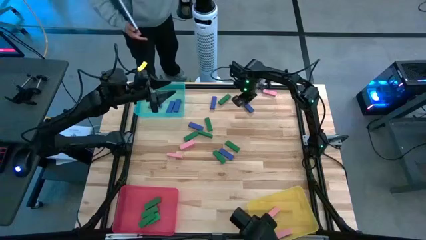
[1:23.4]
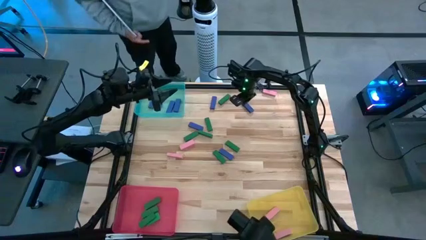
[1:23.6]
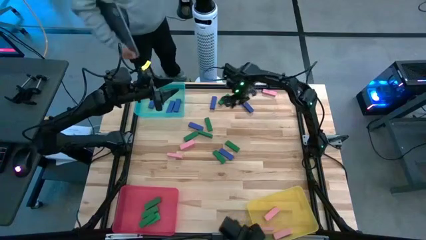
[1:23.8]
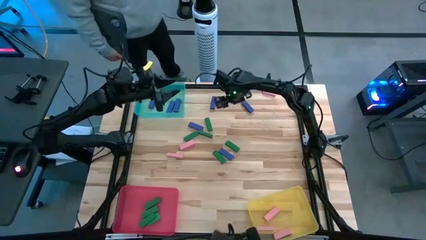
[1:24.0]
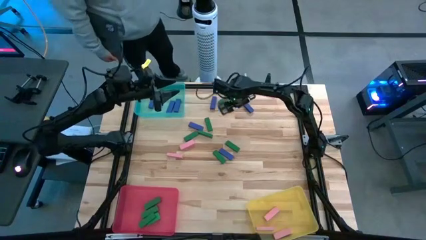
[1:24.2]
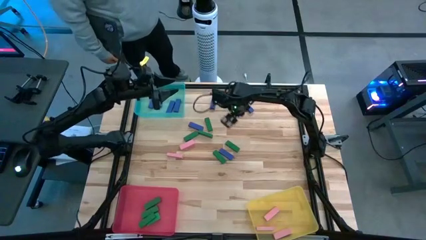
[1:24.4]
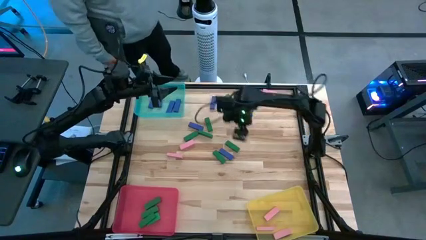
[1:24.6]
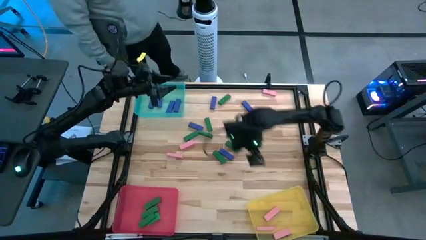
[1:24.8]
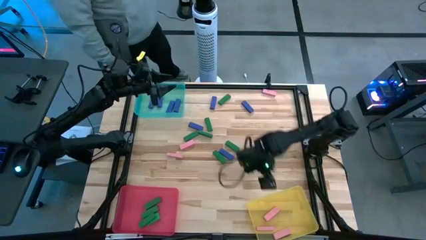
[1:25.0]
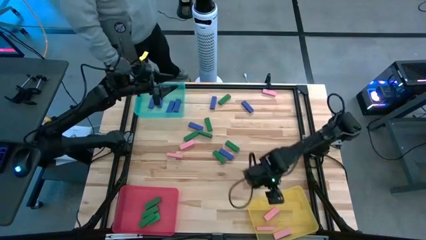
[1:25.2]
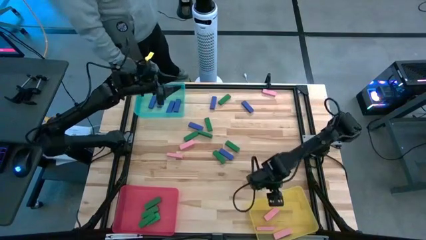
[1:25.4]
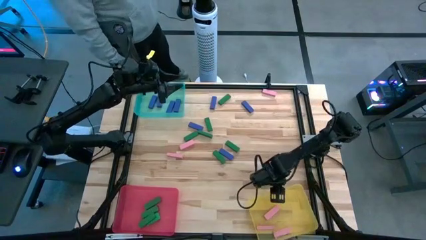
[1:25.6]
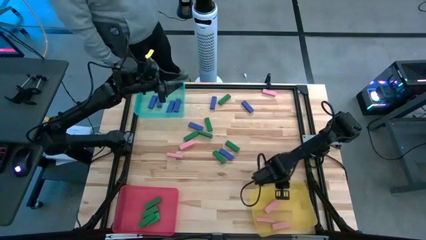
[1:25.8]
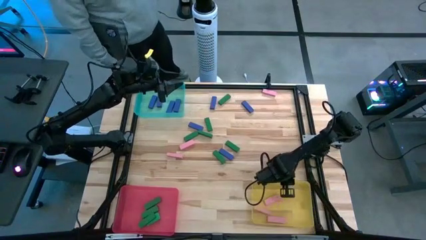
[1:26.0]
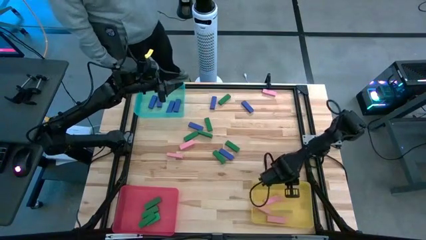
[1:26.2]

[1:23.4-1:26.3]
Task: Sort blocks
Adjust the yellow bin

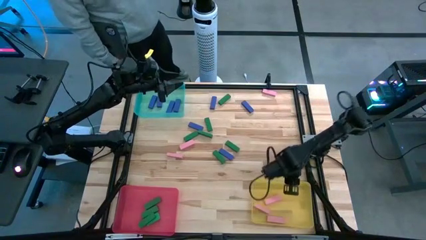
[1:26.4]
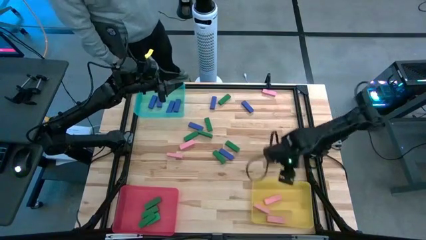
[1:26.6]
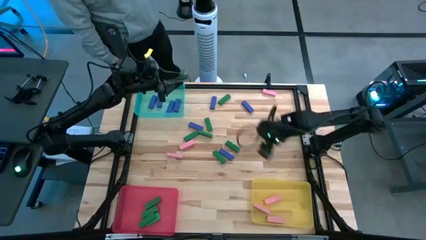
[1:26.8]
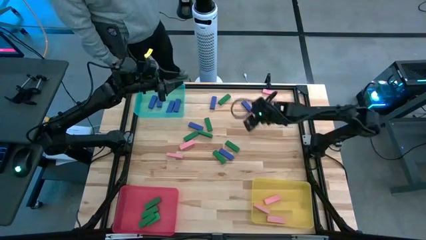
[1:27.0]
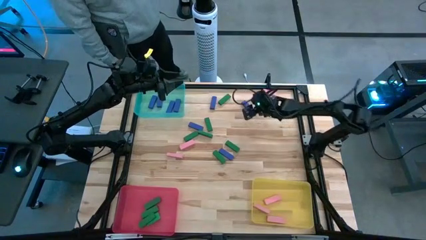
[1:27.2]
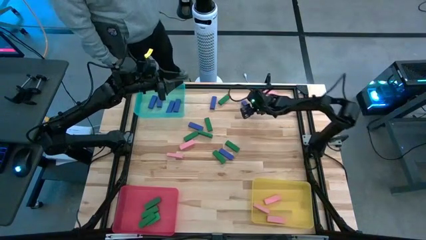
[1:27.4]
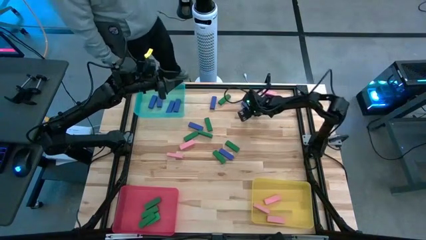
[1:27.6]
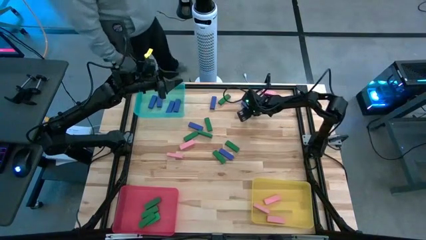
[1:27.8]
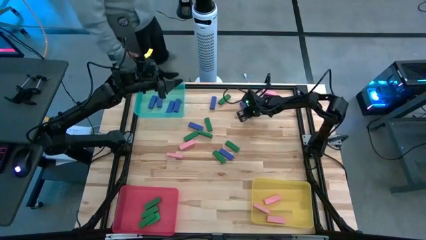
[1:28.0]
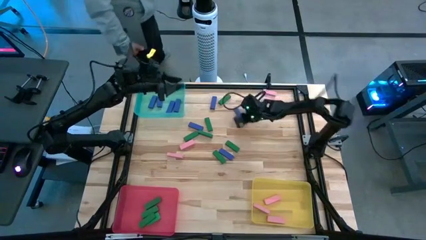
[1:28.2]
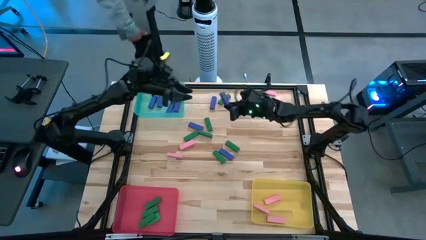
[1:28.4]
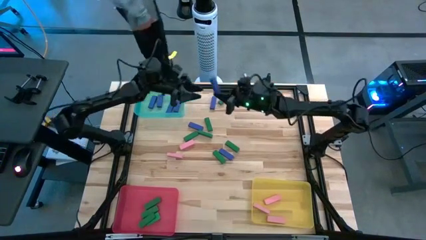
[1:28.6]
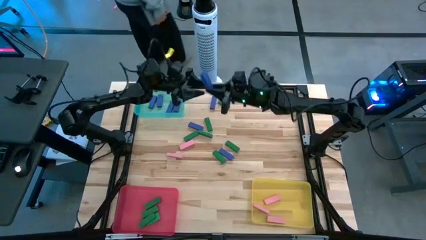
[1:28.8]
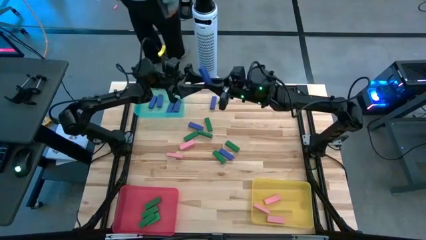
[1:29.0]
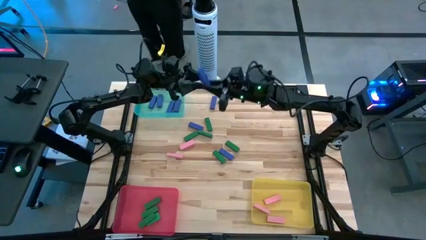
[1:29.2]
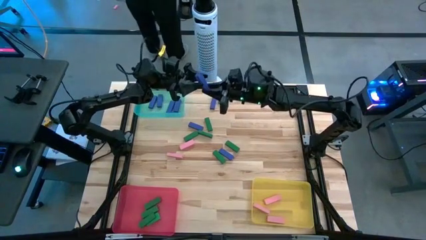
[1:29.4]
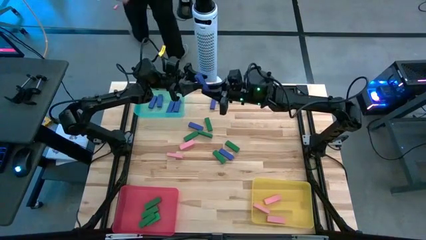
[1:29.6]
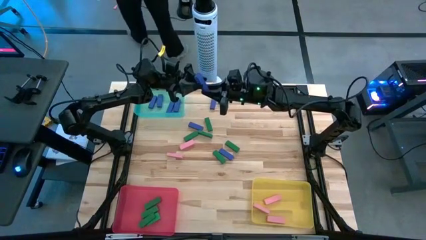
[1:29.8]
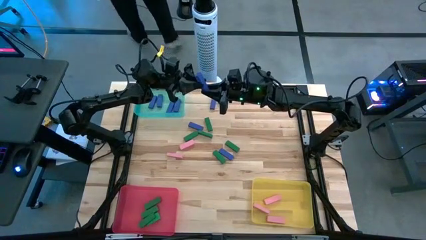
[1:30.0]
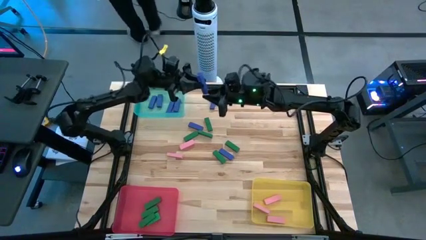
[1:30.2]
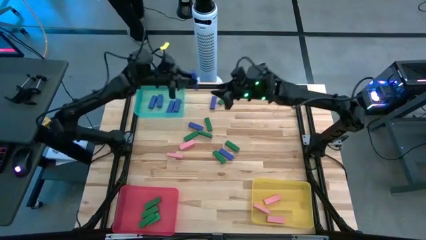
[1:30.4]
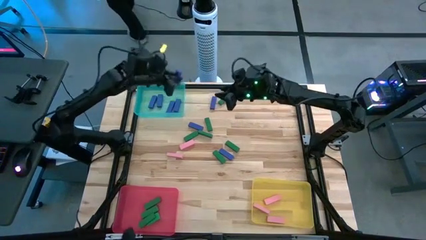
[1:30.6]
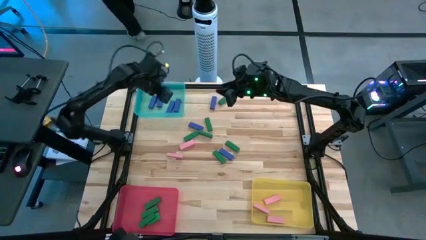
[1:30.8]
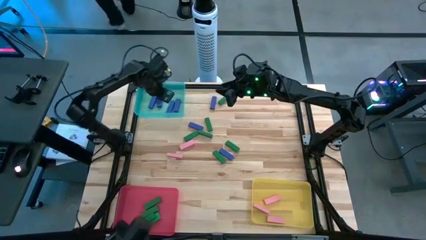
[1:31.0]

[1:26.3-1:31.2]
Put the blue block into the blue bin

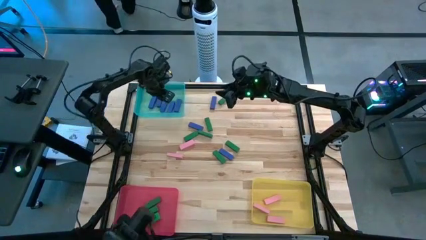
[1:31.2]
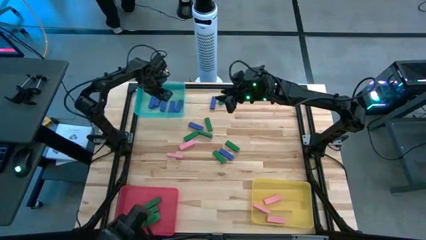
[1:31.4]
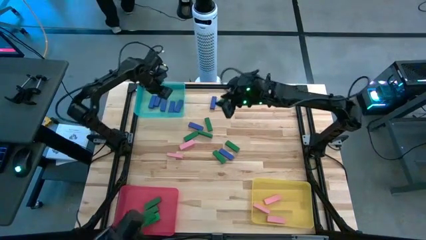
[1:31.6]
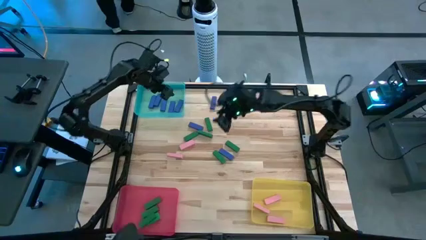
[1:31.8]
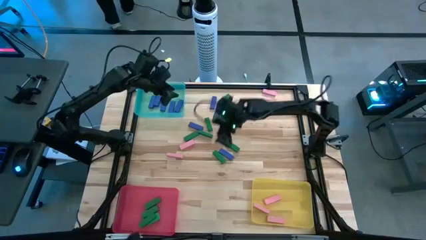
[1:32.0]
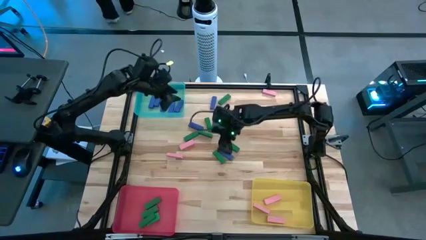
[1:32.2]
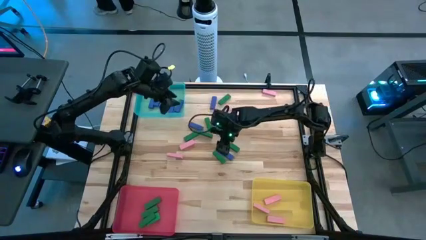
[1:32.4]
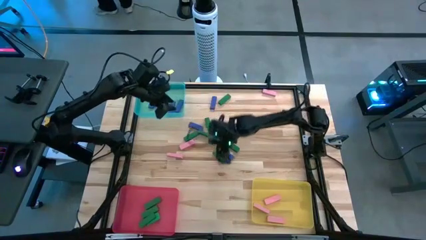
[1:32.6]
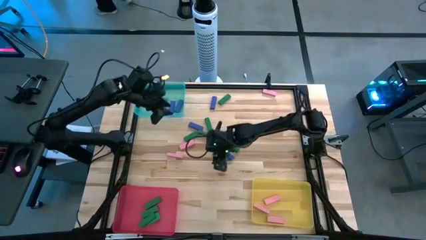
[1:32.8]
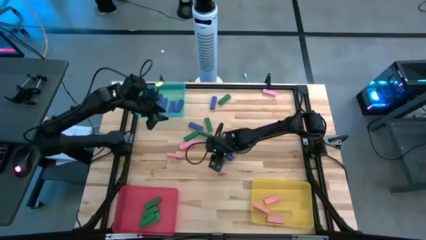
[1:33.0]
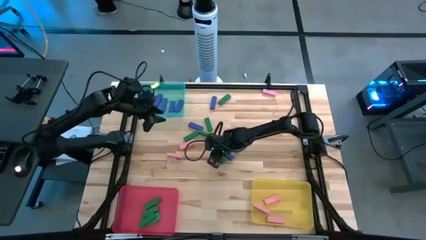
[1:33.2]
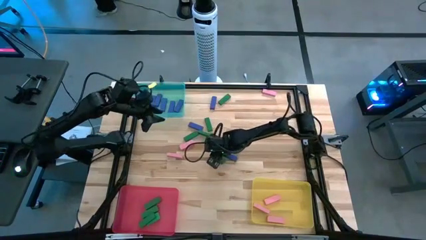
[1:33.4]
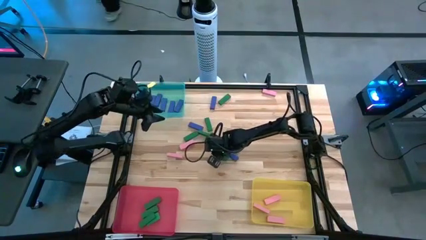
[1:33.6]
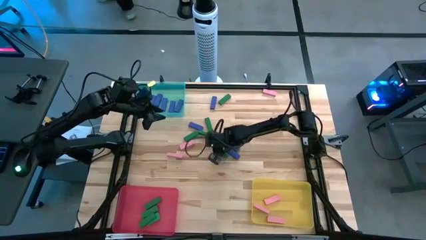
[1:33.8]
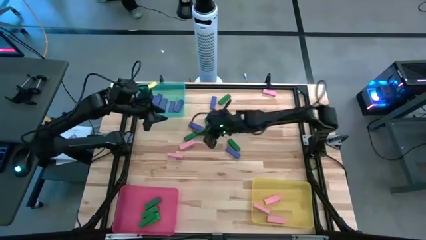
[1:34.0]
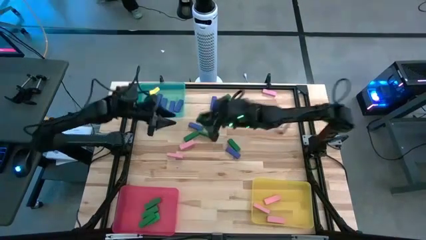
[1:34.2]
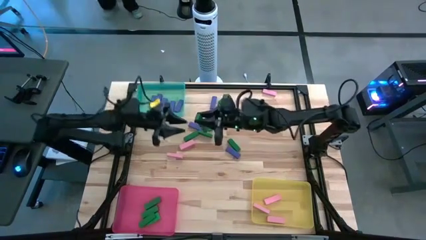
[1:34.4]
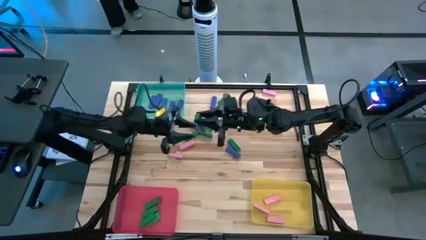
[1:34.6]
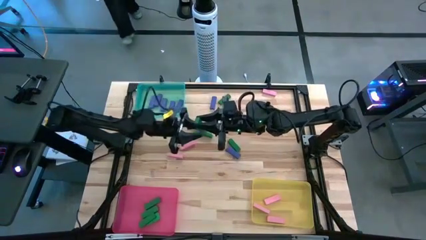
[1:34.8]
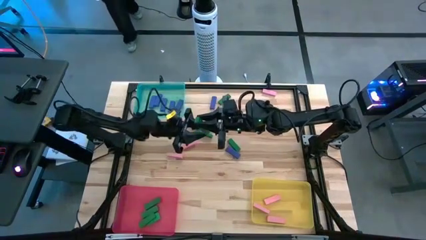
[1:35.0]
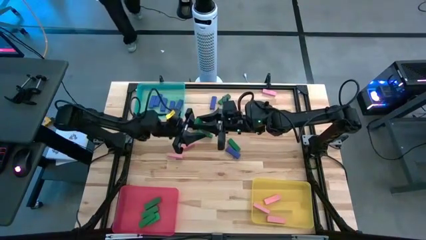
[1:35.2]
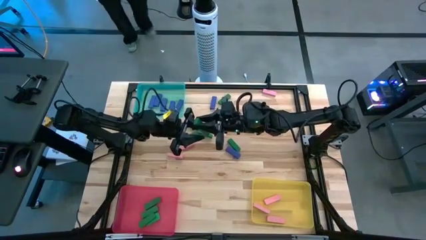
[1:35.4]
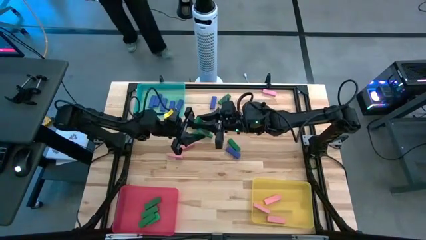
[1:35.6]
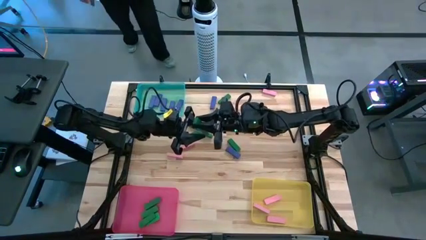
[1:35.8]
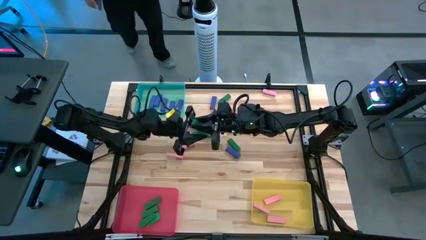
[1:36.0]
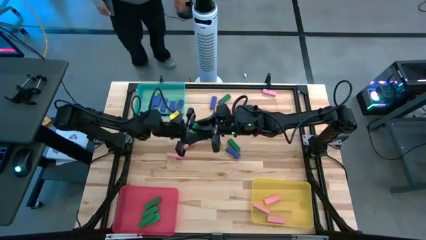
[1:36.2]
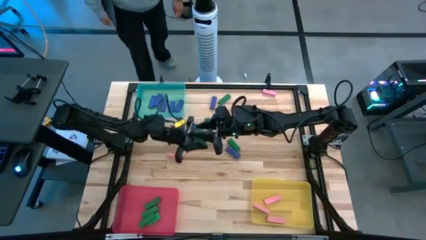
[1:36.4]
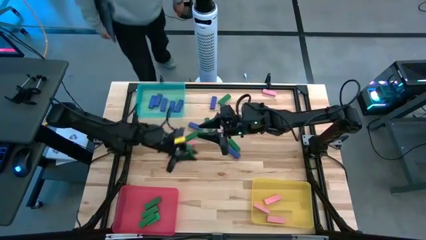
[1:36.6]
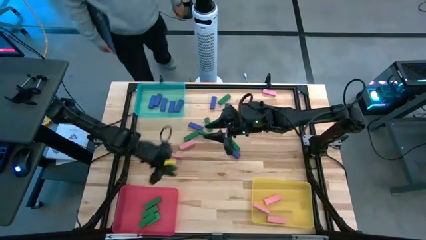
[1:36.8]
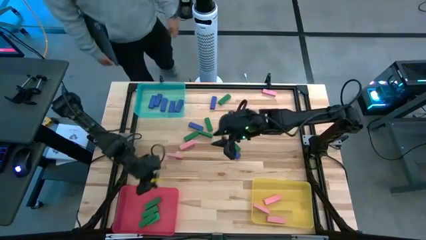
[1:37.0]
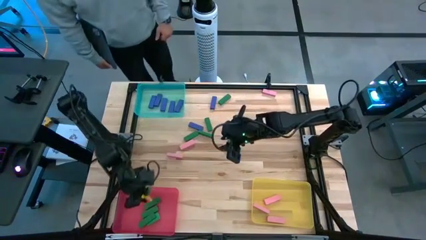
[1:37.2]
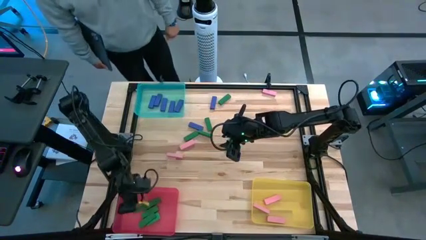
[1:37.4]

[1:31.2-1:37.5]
Put the green block into the red bin
